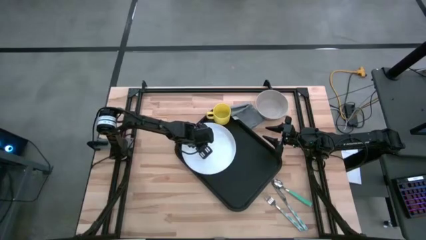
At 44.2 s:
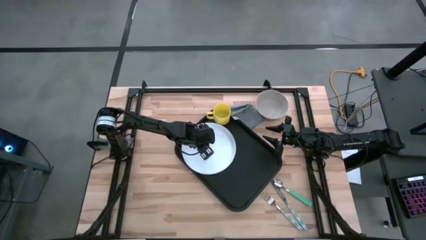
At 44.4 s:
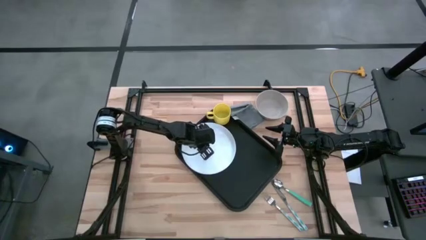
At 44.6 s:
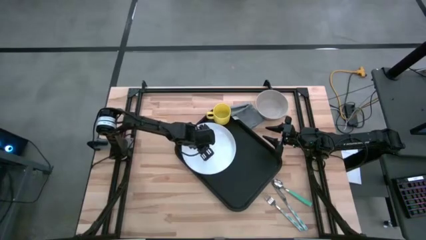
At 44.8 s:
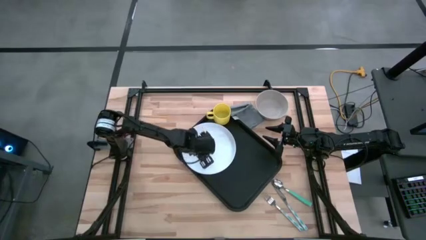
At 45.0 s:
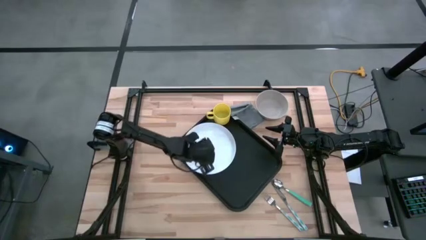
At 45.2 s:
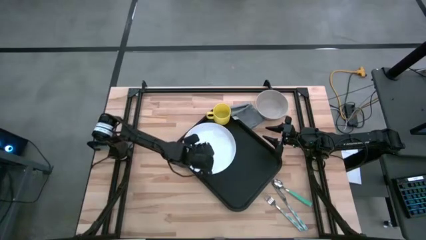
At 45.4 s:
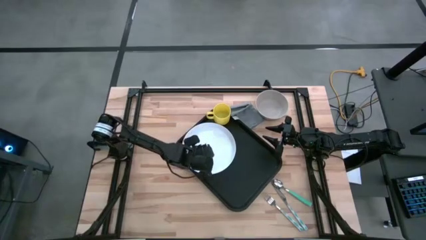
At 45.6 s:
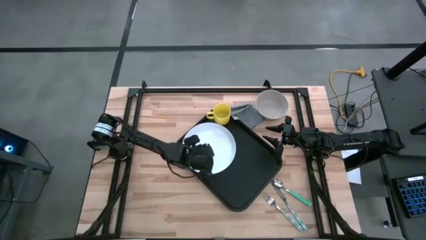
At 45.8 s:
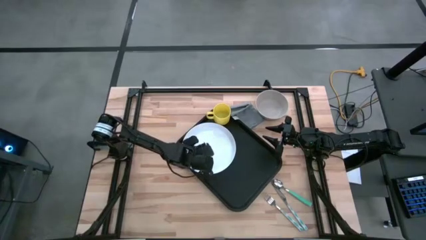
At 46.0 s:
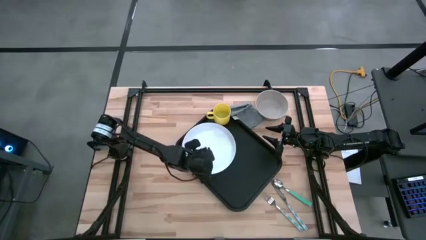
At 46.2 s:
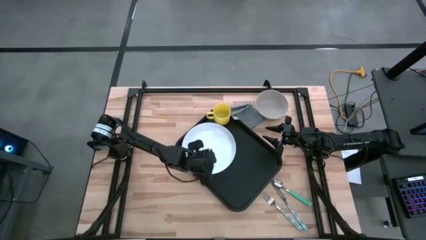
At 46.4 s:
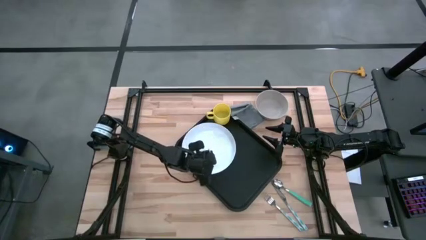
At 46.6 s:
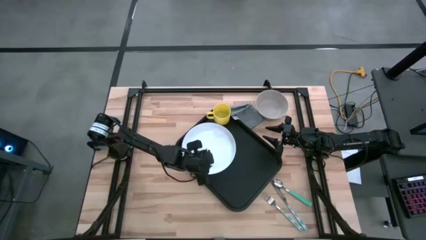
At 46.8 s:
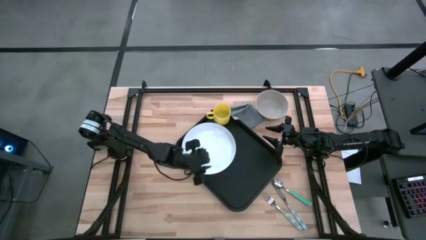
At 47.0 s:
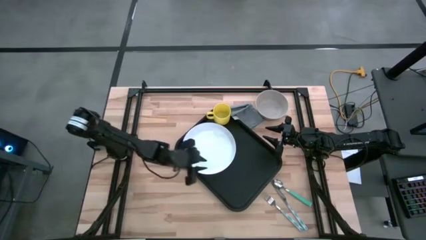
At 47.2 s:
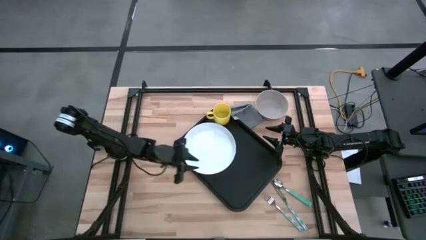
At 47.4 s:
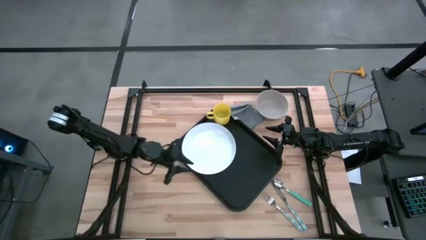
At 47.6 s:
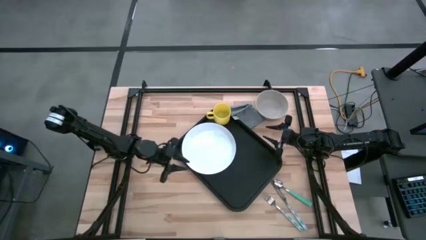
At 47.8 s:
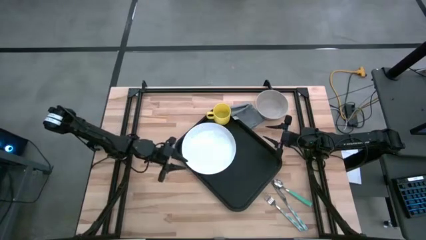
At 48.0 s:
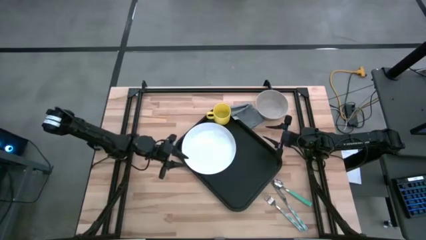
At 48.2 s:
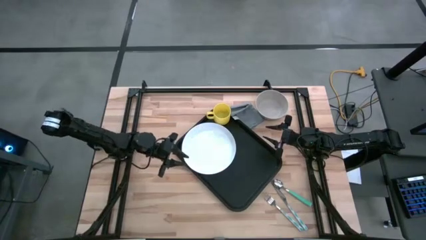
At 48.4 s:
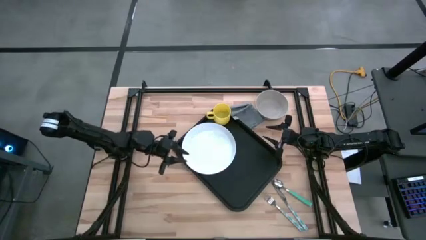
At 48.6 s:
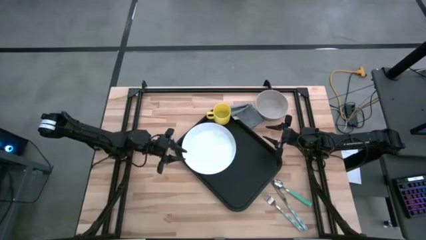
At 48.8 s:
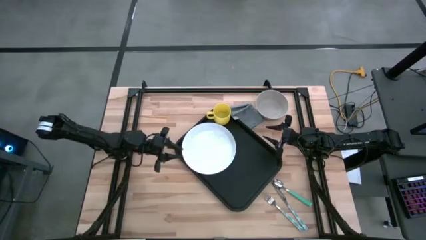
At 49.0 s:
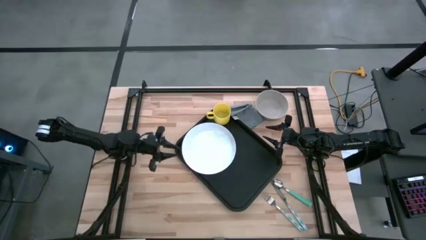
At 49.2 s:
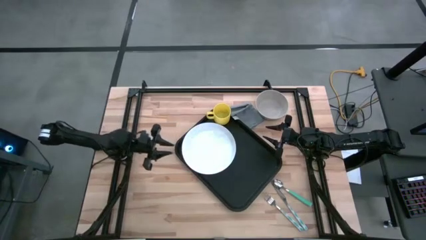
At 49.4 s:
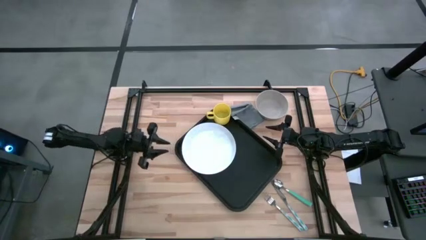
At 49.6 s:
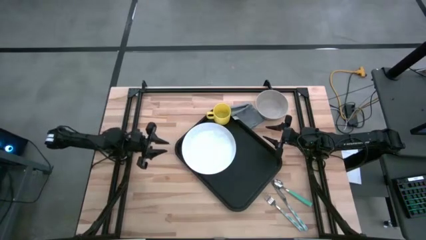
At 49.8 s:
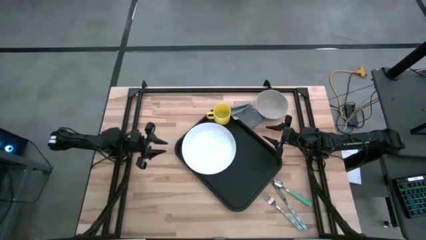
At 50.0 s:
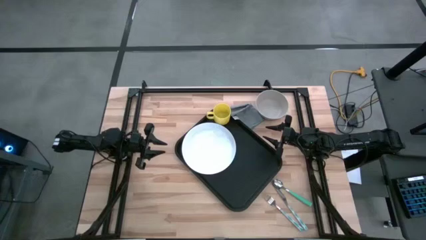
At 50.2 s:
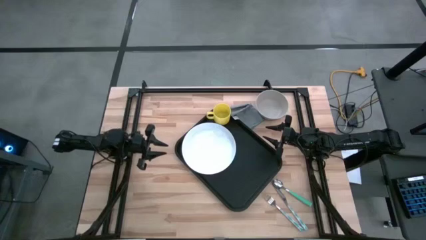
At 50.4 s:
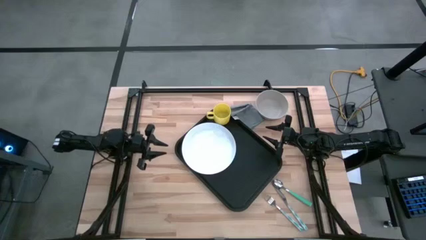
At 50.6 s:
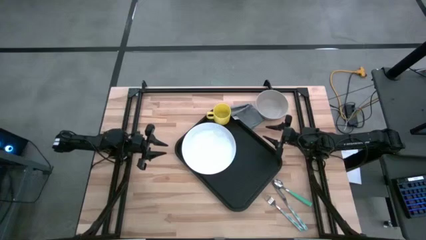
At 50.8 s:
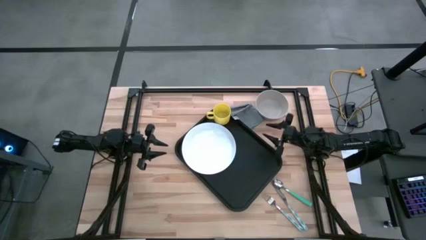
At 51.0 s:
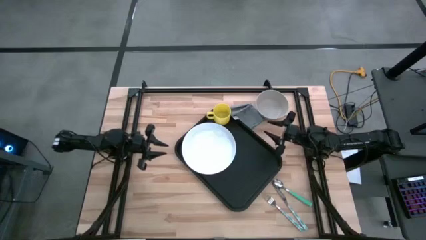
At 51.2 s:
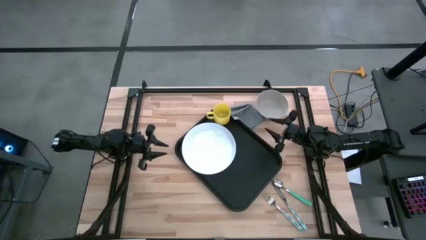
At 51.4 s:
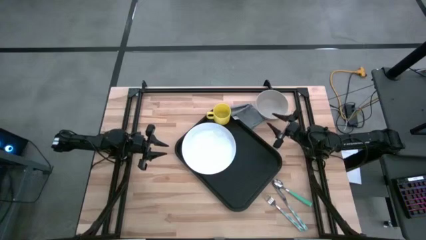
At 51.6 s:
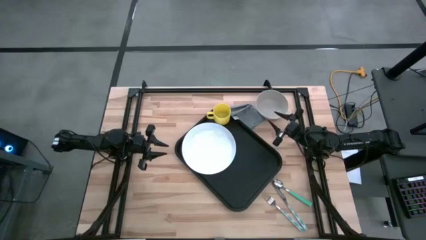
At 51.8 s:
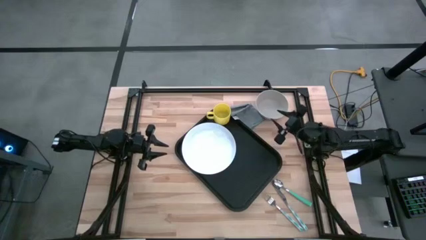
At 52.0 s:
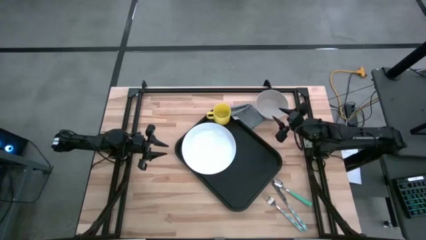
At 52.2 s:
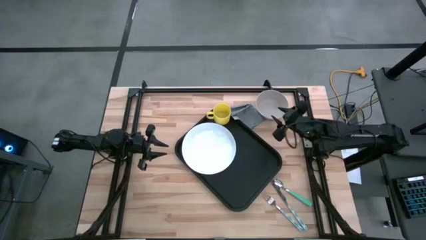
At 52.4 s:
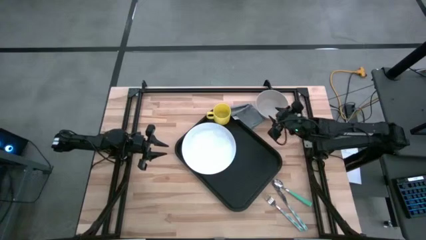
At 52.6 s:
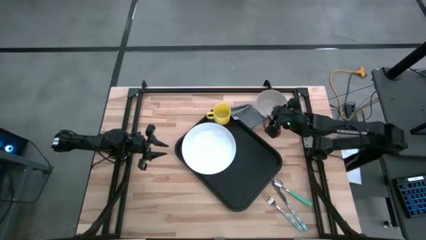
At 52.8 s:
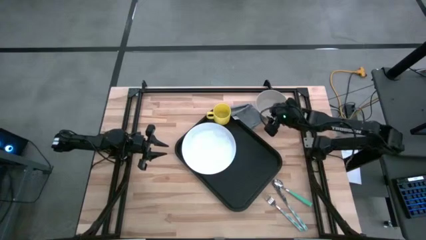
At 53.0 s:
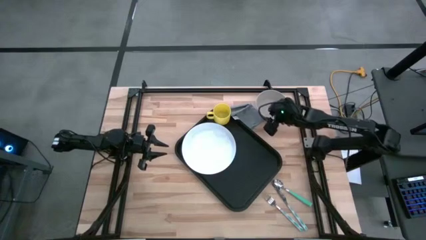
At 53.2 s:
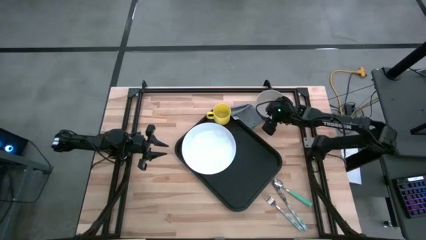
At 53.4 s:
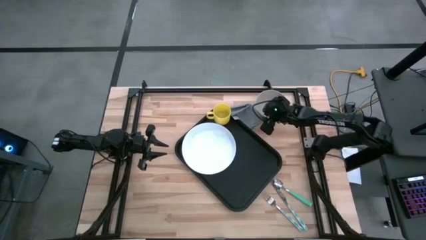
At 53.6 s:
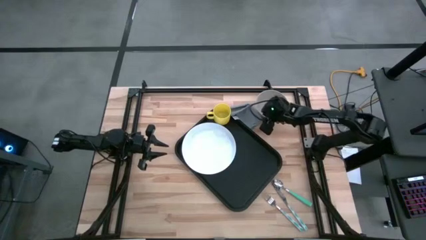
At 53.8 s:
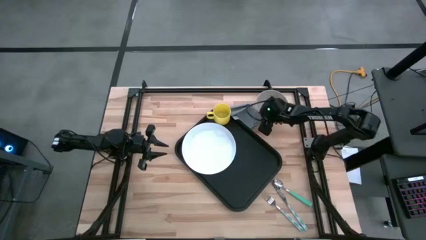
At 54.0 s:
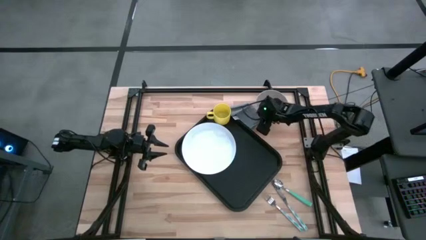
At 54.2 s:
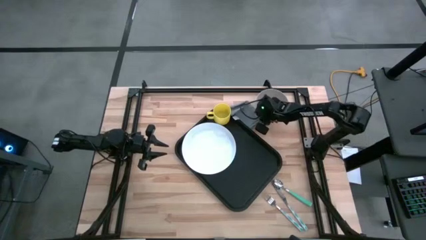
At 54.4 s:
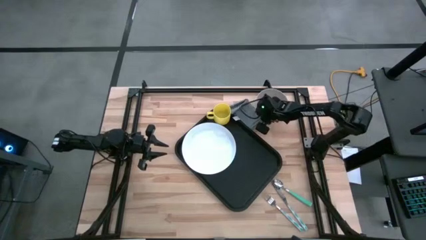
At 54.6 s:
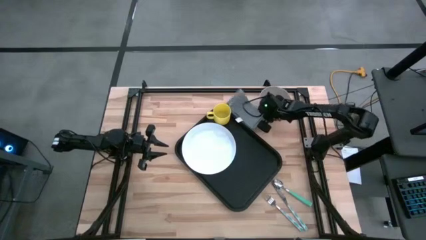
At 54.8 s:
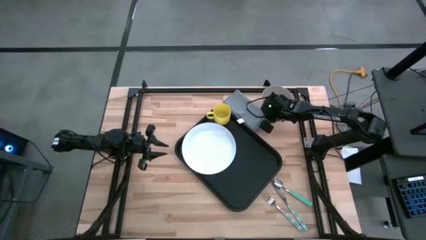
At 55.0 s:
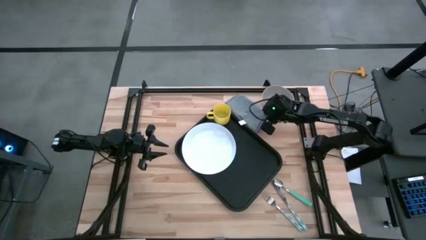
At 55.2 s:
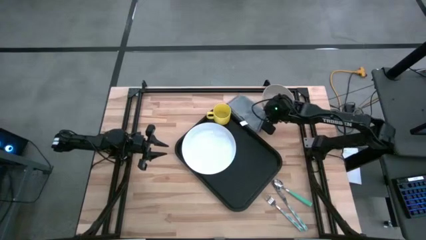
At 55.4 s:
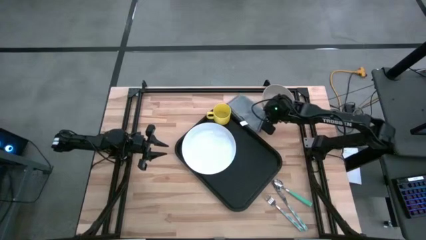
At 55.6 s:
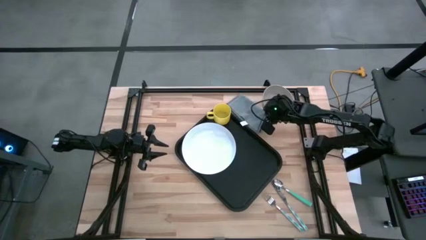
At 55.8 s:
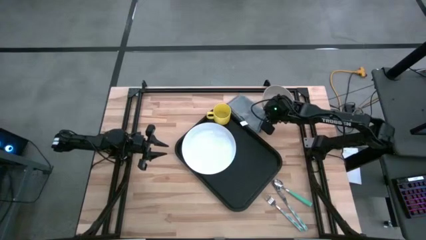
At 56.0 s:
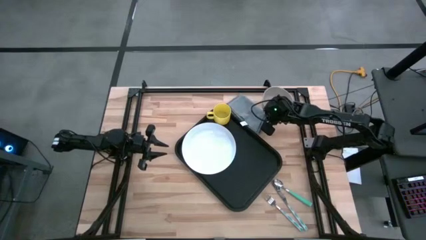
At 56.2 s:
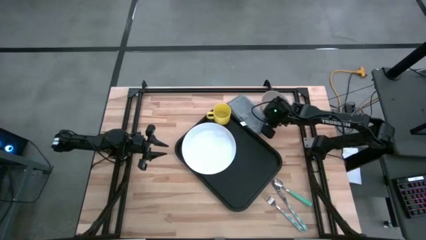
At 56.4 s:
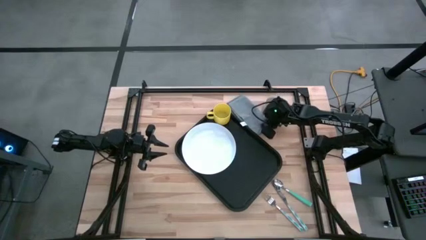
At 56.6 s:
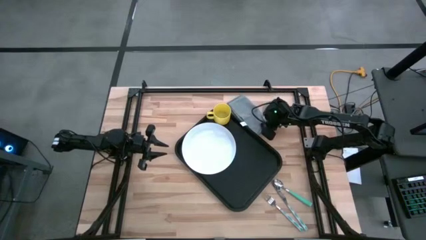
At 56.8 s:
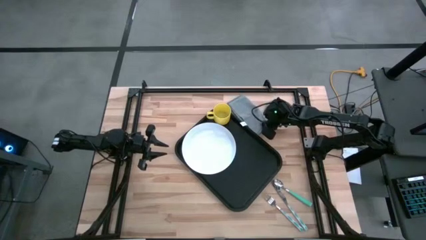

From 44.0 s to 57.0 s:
Task: Set up tray
Put the gray bowl on top of the white plate on the black serving tray

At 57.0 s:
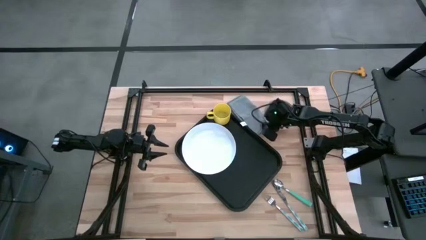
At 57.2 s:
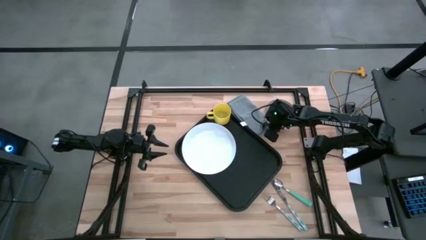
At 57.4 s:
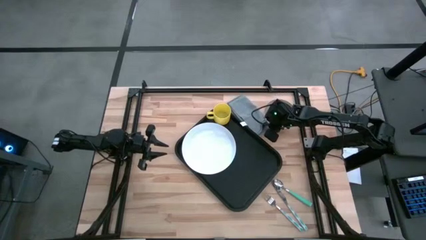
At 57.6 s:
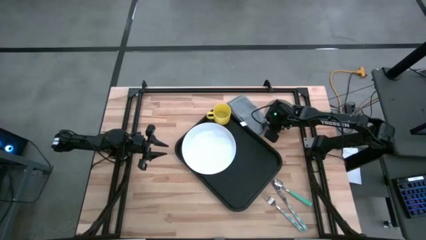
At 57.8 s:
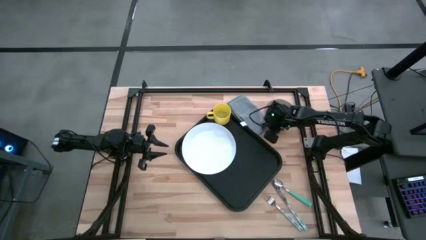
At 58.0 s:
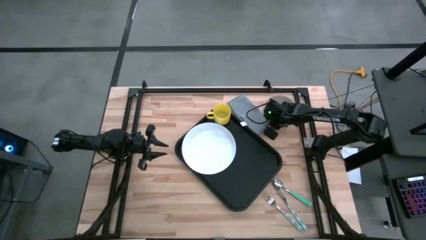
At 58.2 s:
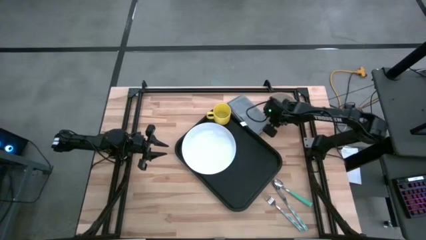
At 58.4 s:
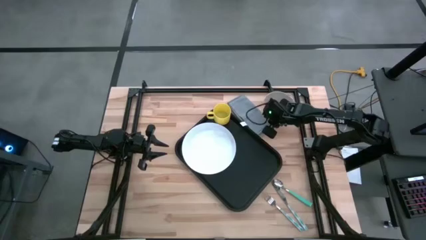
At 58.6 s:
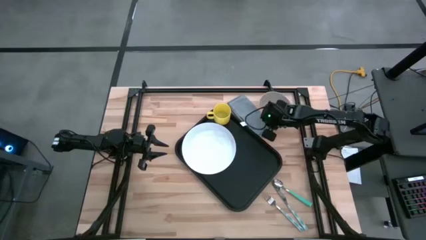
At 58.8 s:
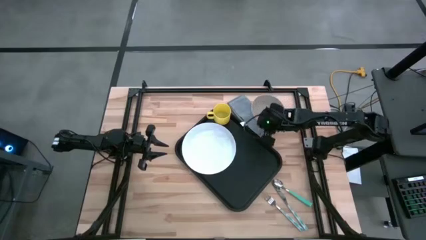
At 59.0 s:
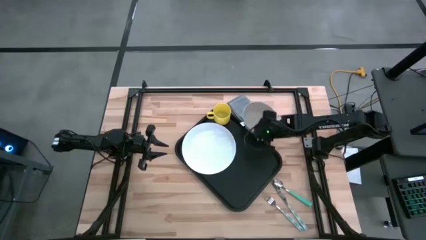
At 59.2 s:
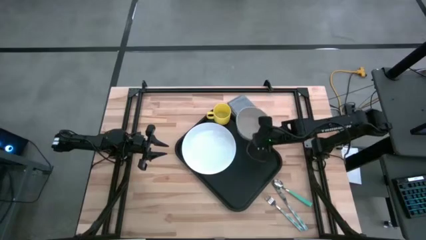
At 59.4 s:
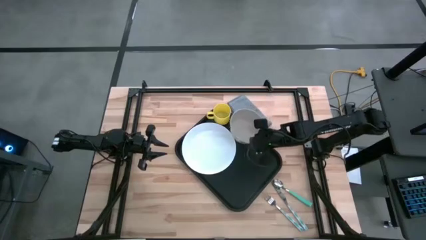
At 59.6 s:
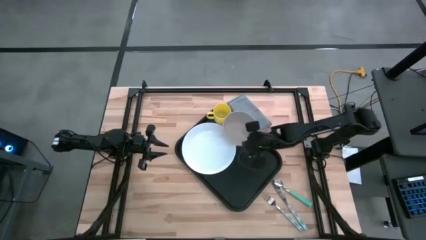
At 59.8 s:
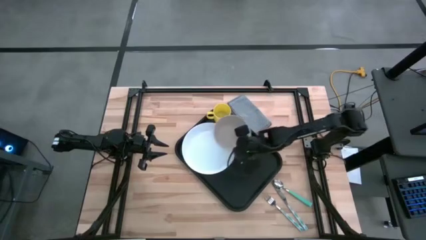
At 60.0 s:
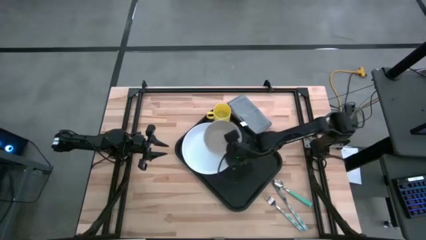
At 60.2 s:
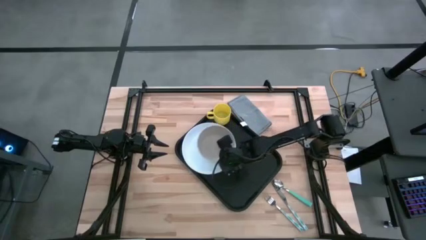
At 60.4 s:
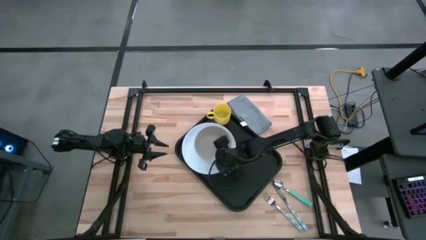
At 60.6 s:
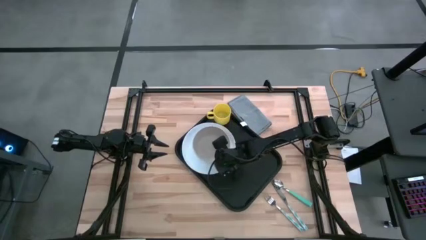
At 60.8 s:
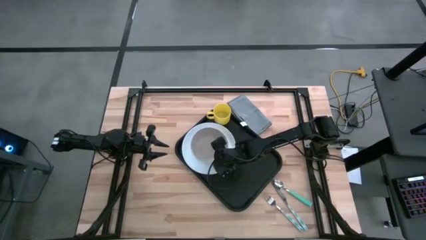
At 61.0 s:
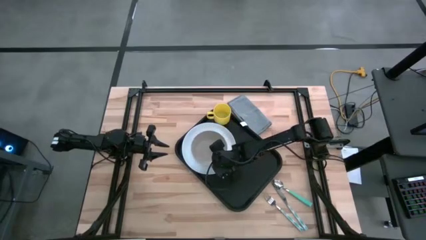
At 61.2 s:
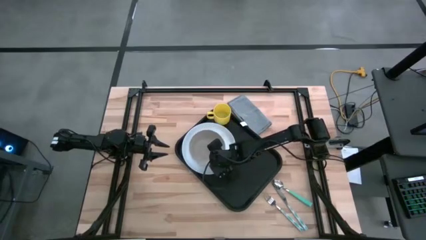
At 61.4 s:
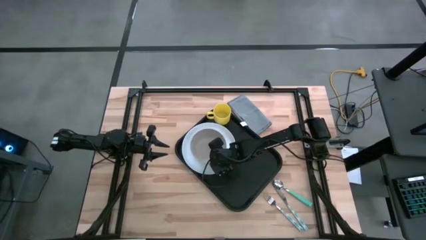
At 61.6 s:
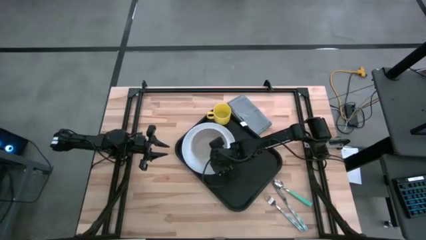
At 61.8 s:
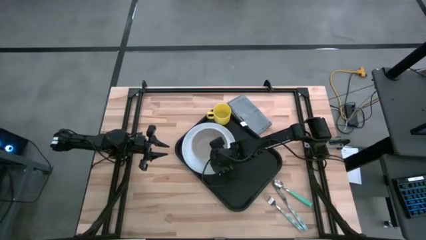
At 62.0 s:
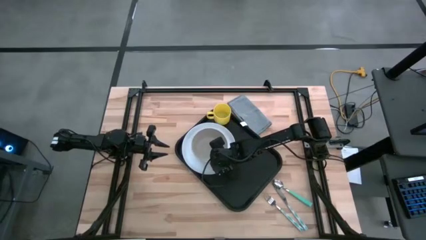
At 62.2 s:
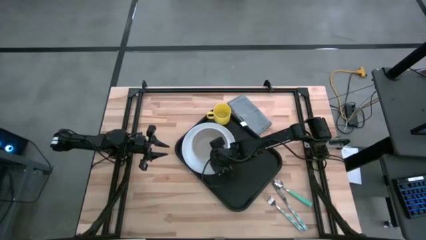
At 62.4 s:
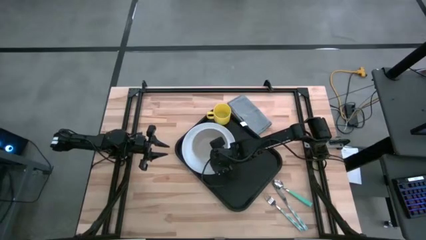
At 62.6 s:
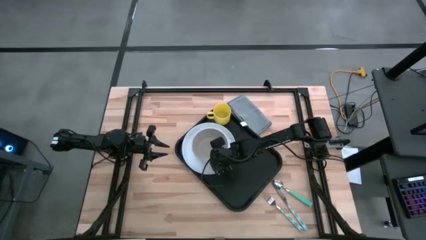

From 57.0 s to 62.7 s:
Put the gray bowl on top of the white plate on the black serving tray
